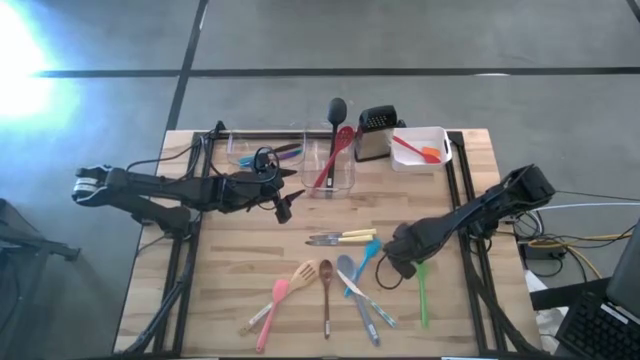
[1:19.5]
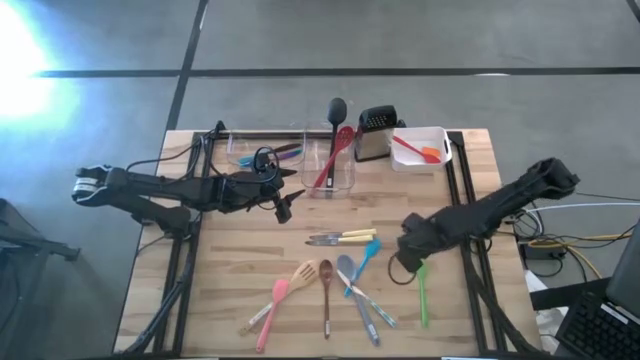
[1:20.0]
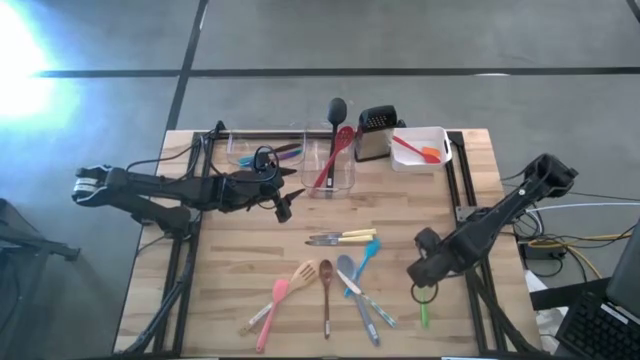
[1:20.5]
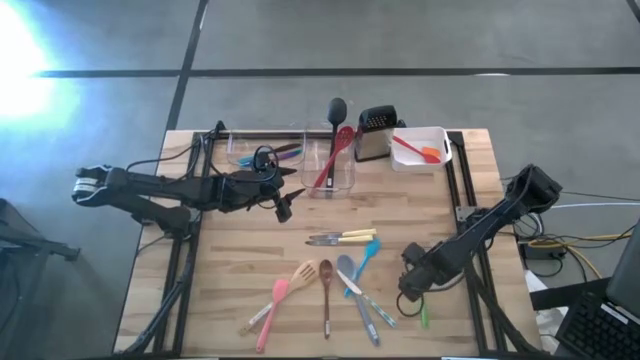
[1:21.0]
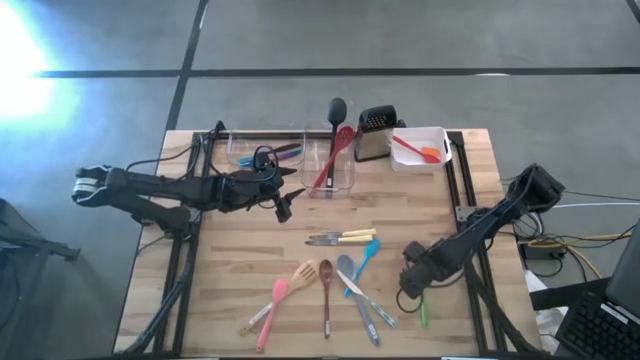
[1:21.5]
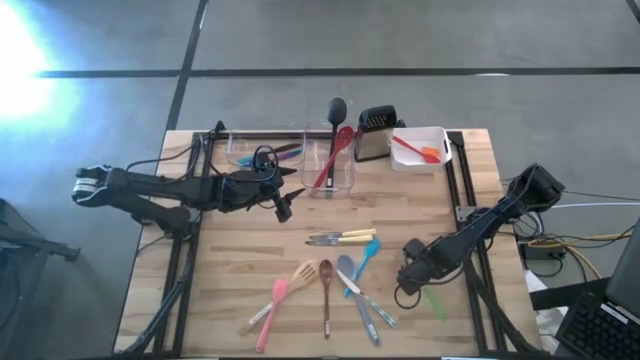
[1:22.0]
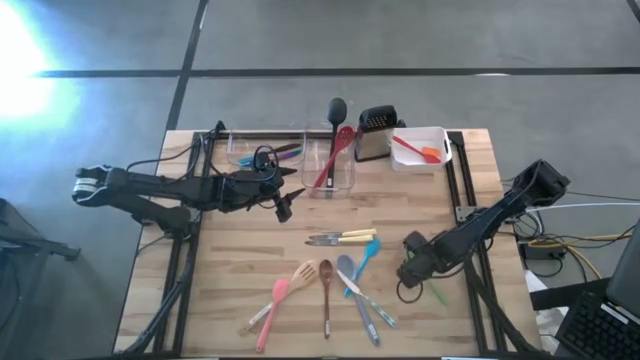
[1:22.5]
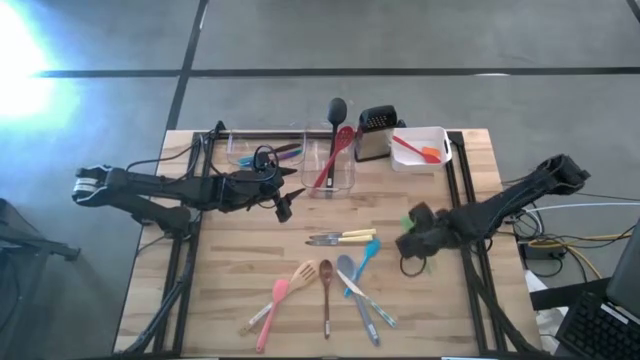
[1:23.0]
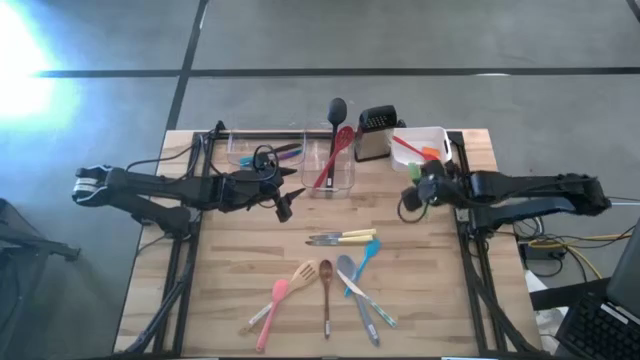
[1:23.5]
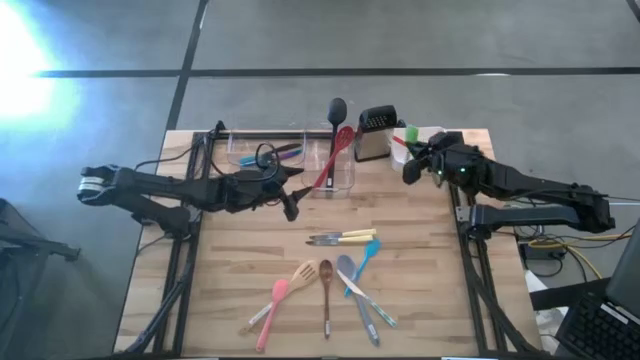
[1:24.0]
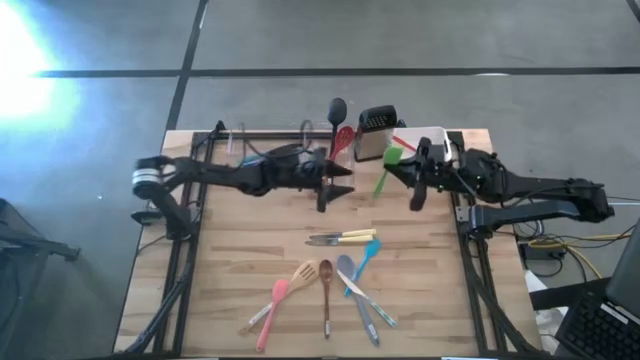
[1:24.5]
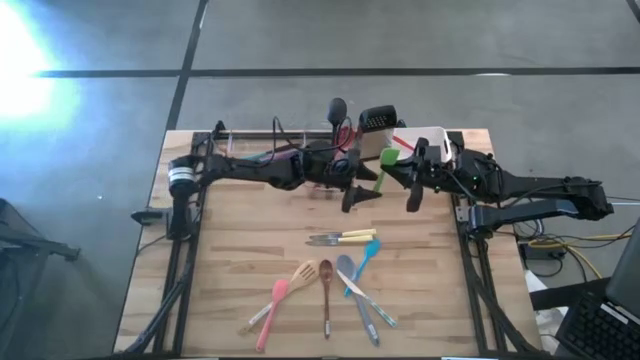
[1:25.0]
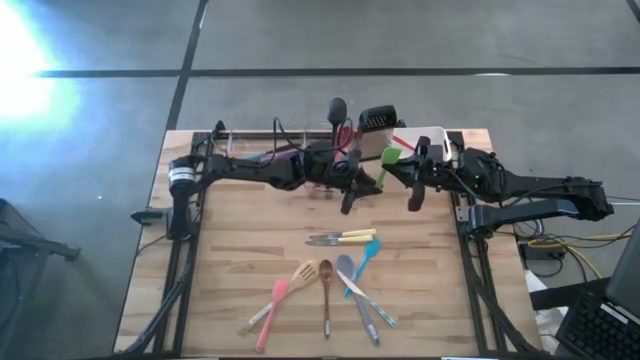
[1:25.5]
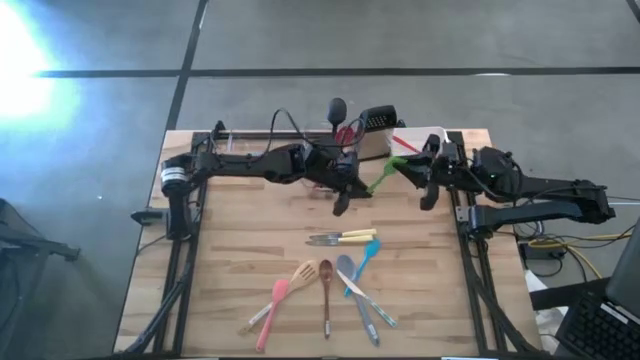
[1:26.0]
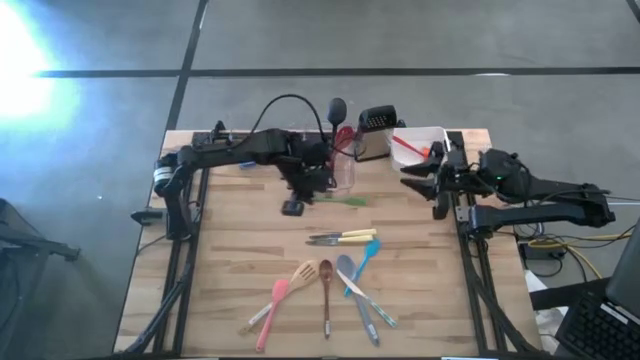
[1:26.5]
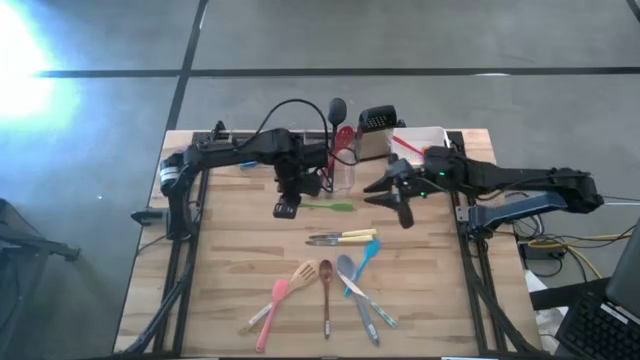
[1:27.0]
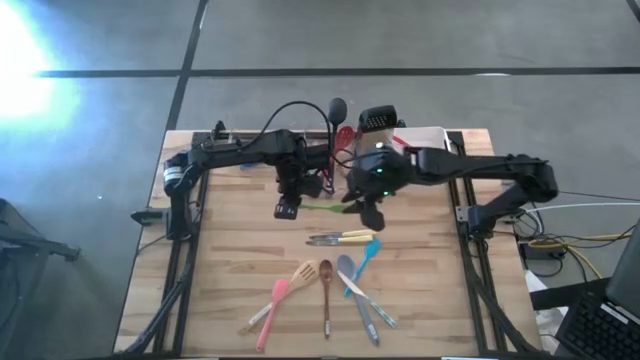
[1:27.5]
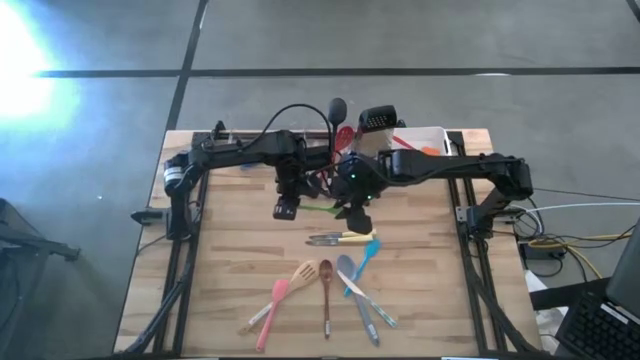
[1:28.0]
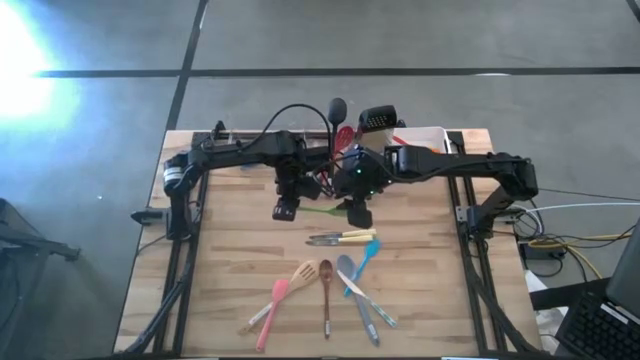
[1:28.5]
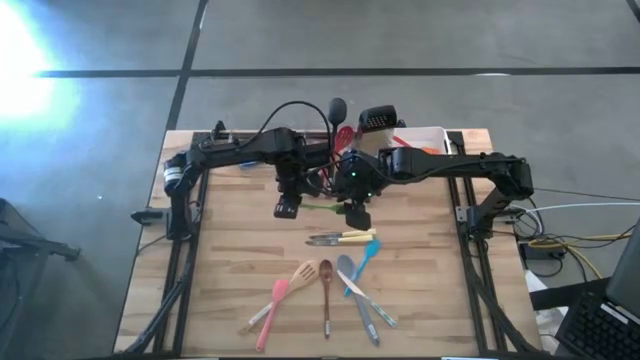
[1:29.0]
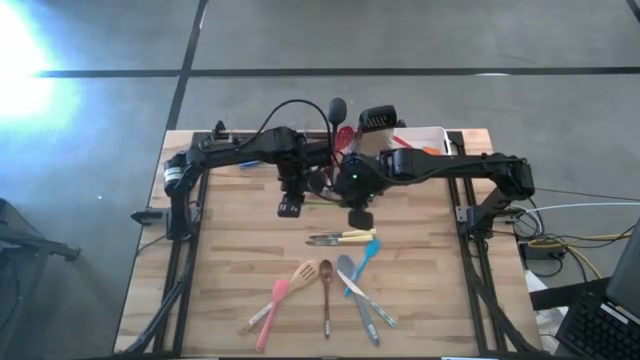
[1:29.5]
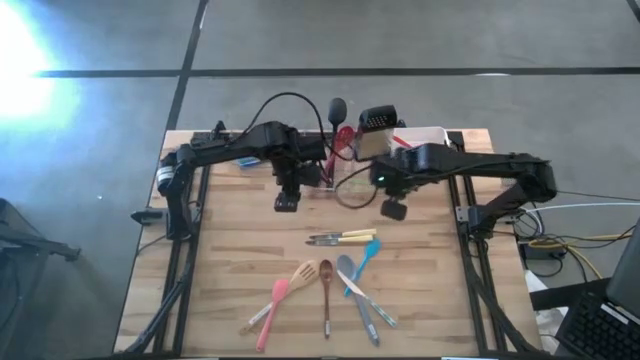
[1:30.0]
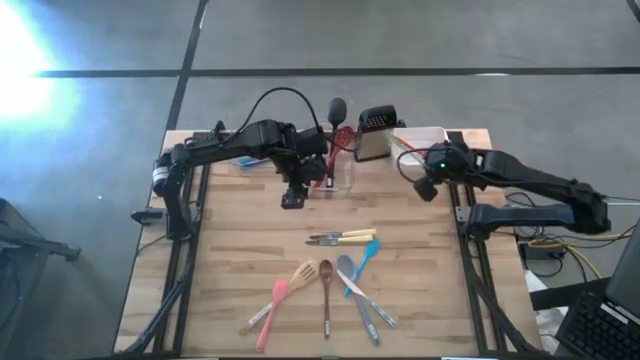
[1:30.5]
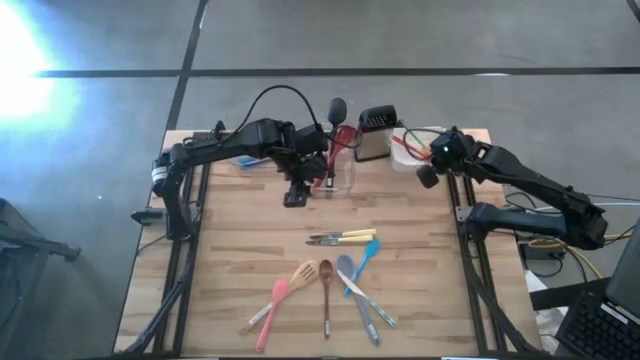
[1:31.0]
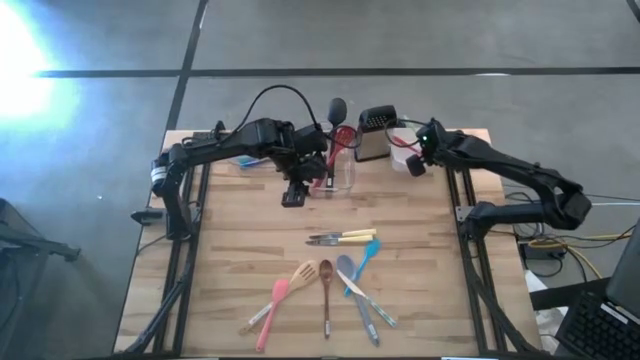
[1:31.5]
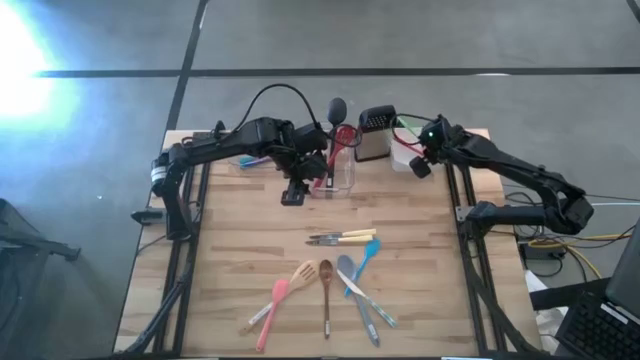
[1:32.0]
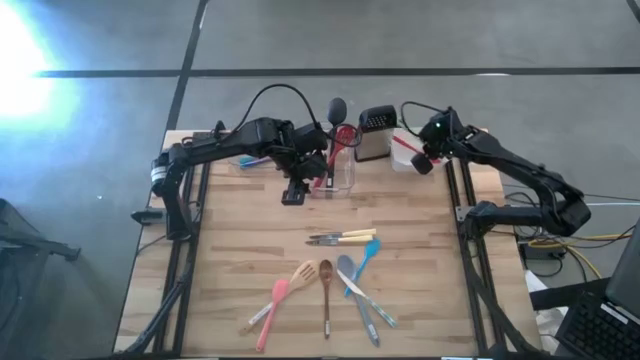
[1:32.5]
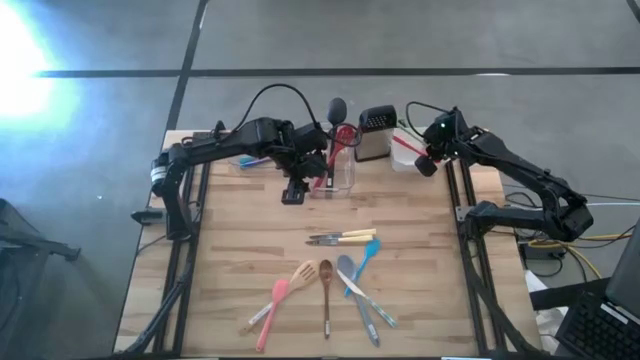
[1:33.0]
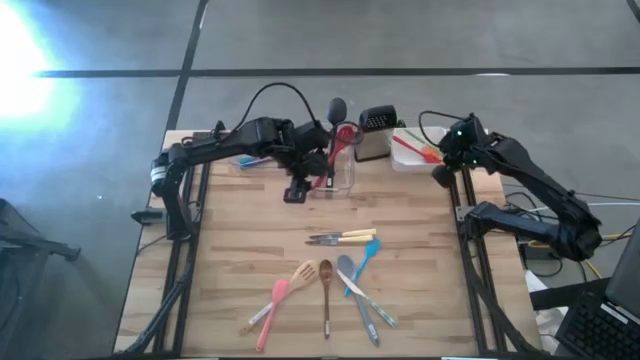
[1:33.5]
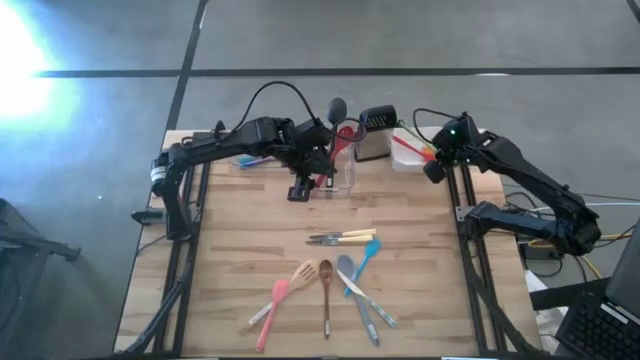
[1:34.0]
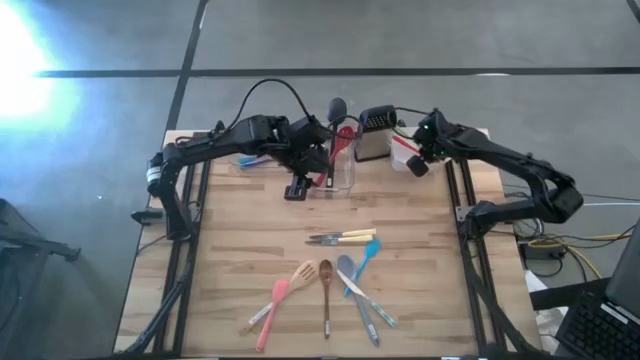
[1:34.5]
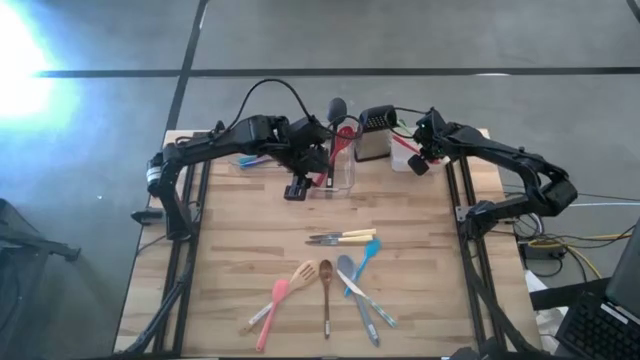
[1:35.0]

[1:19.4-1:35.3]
Task: Pick & Place Kitchen Items
Put the green spatula into the white bin

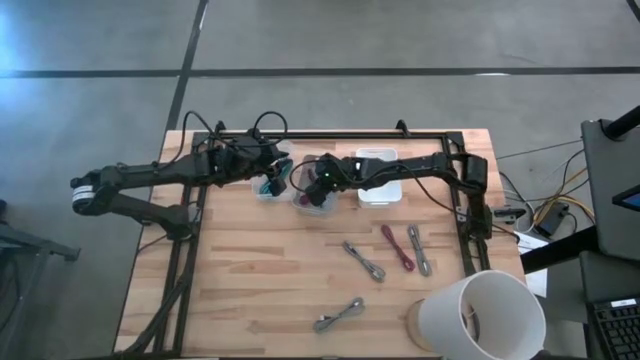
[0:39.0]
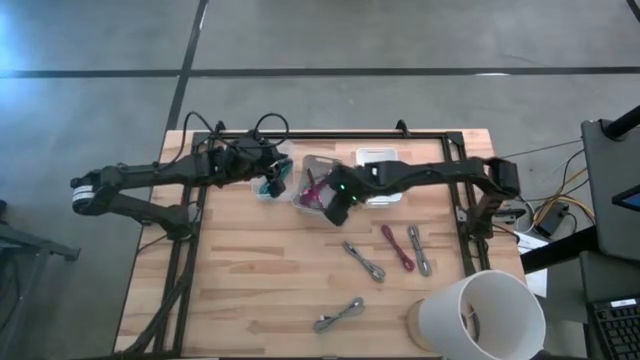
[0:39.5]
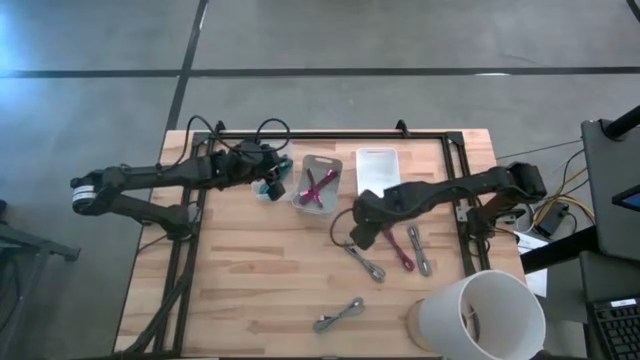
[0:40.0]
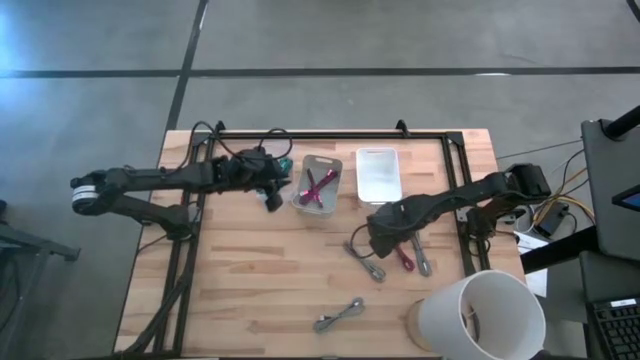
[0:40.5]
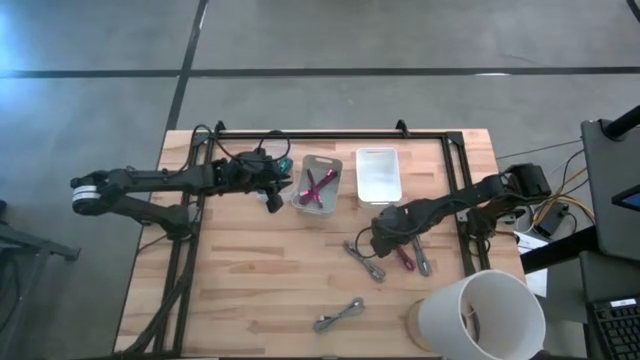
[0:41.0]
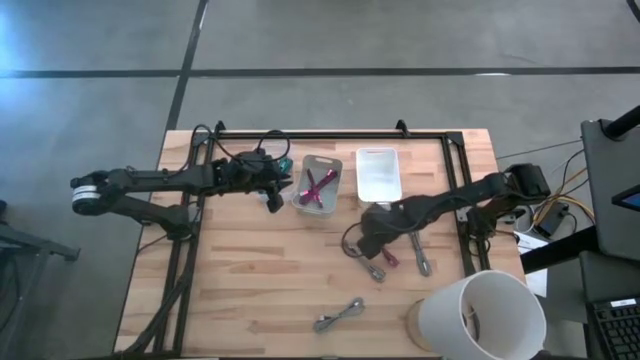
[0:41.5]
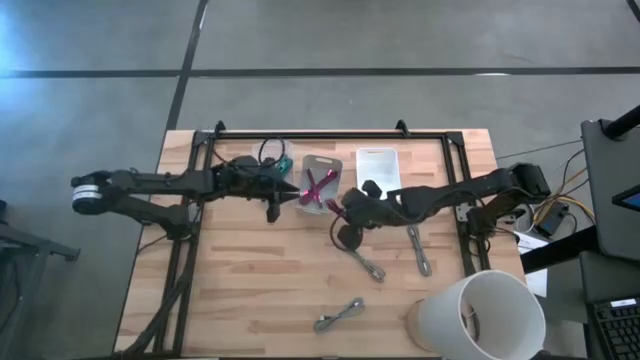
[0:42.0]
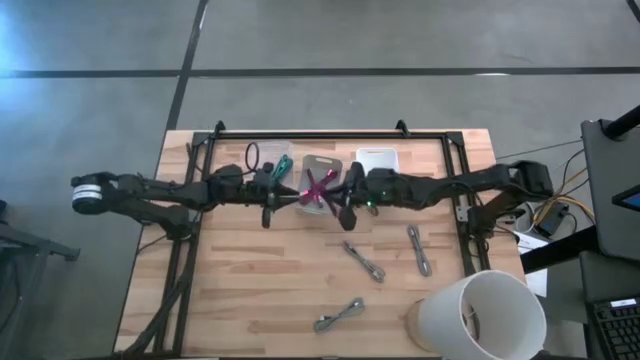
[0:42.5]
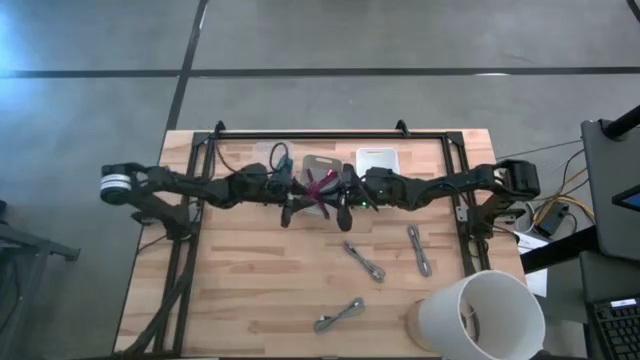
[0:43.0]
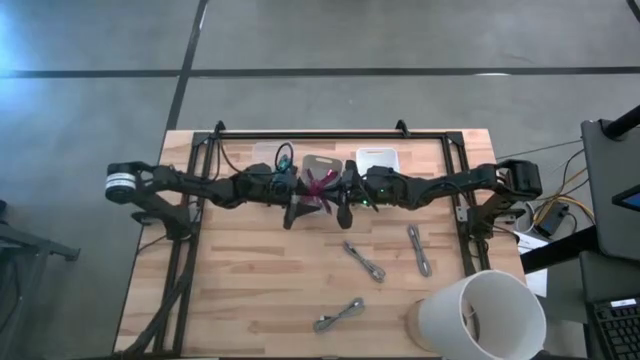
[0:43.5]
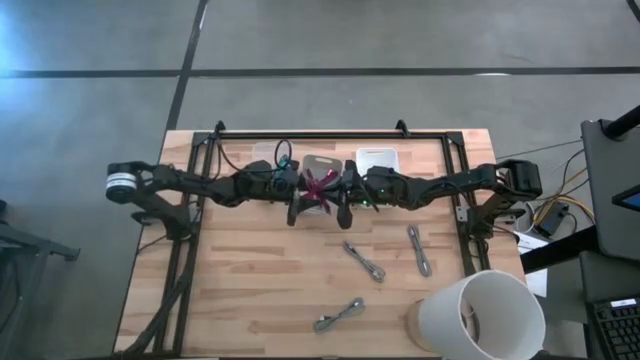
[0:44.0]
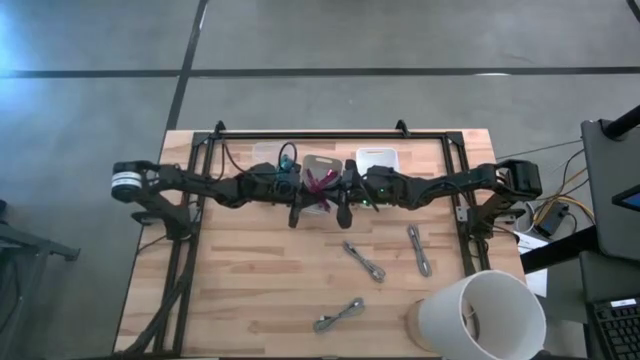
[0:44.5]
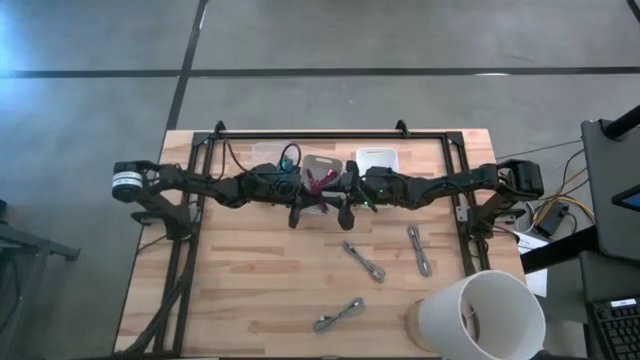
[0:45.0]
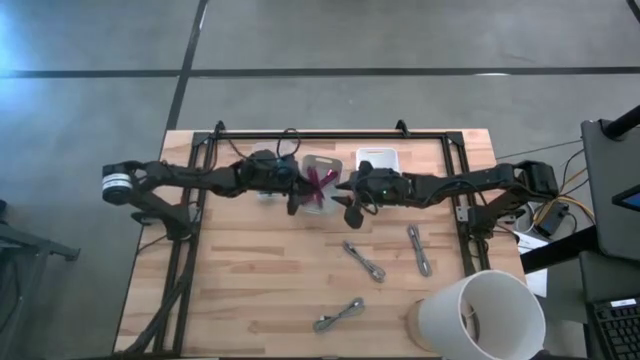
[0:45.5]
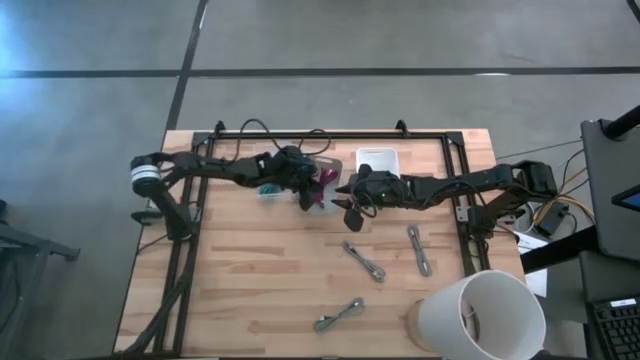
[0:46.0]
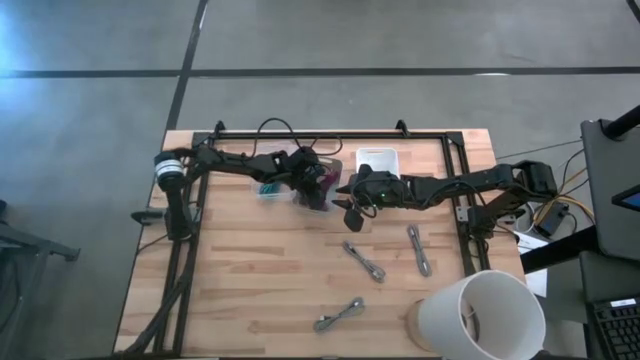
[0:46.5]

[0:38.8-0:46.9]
Task: Pick & Place USB Port
Put the pink charger cable into the gray bin
